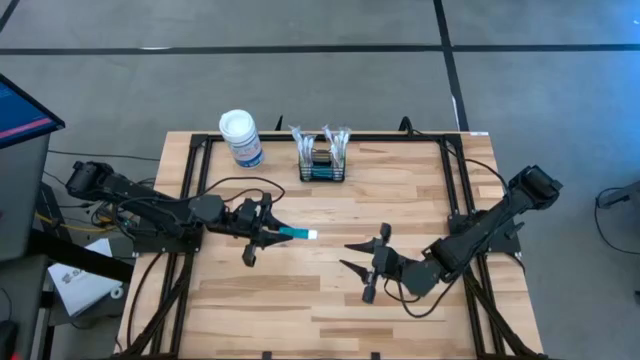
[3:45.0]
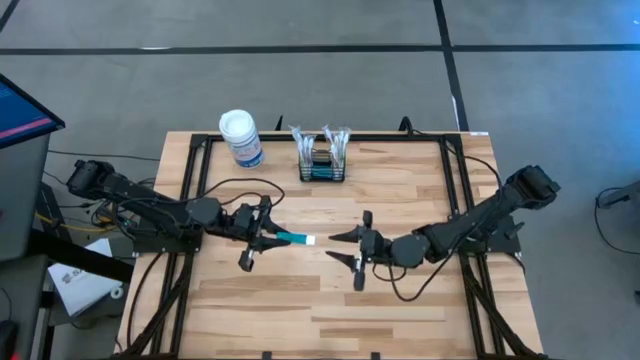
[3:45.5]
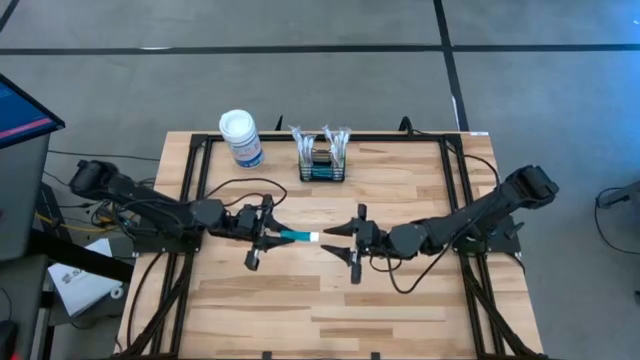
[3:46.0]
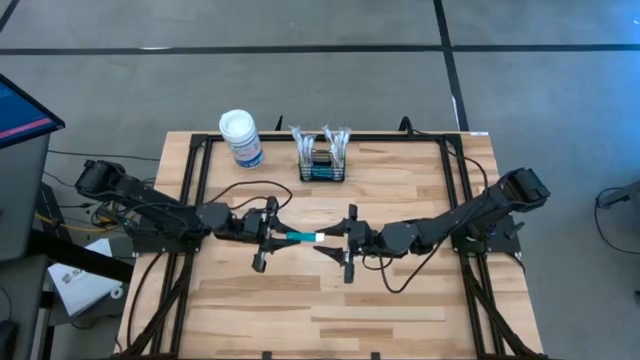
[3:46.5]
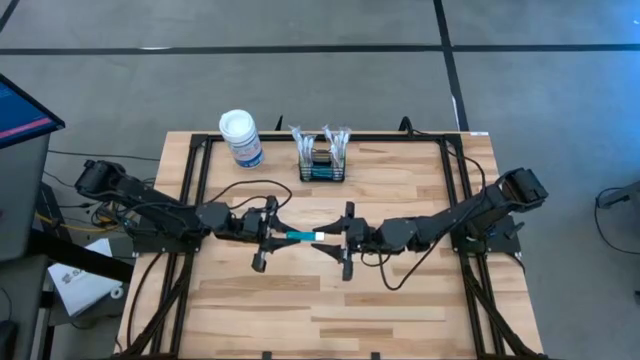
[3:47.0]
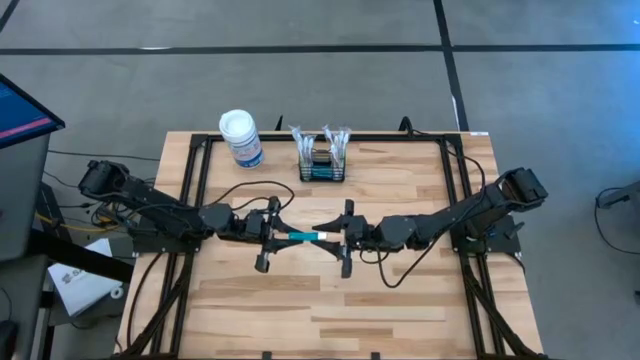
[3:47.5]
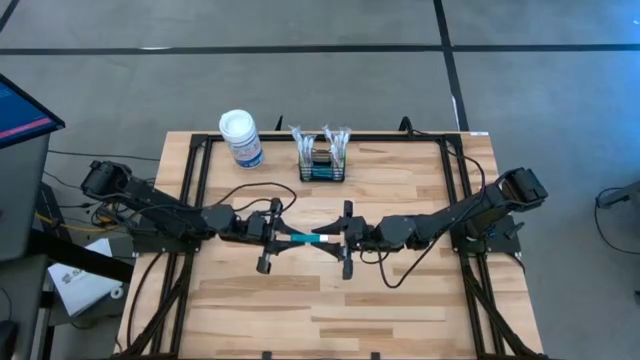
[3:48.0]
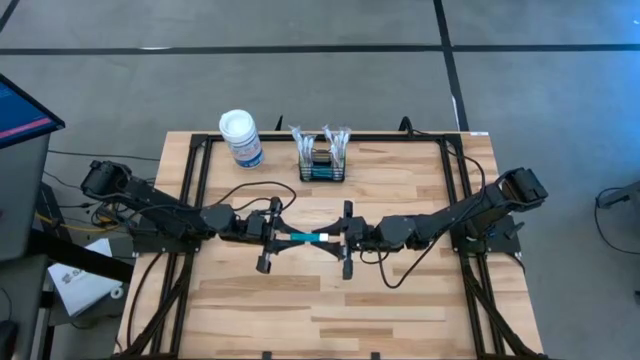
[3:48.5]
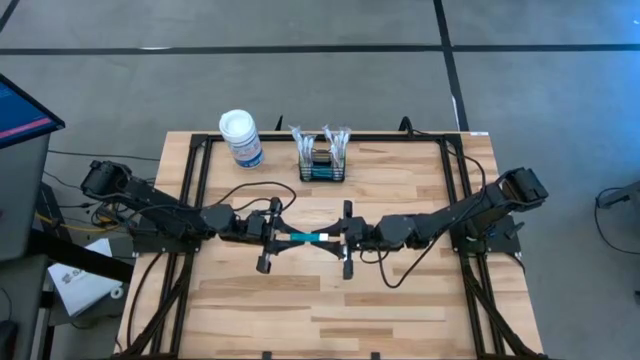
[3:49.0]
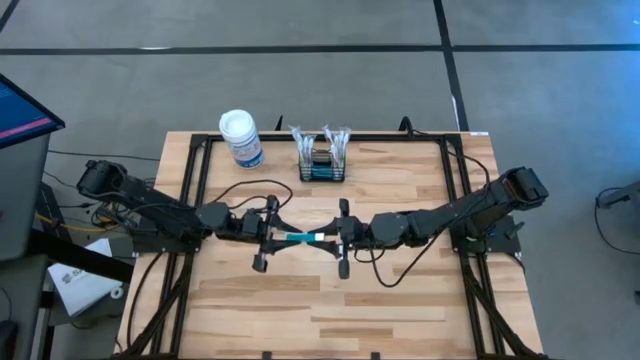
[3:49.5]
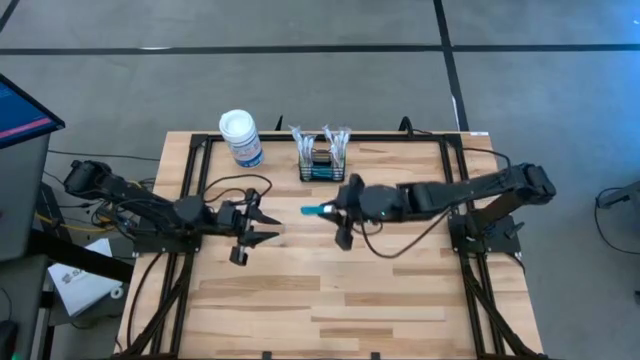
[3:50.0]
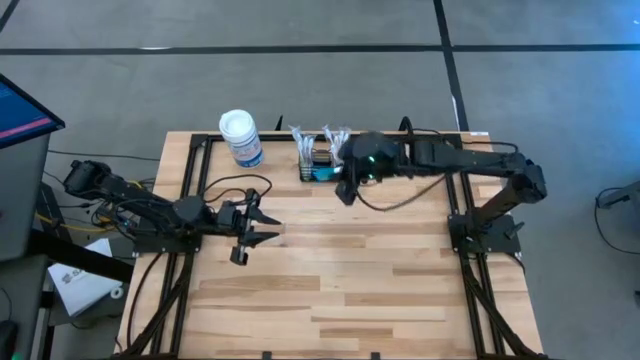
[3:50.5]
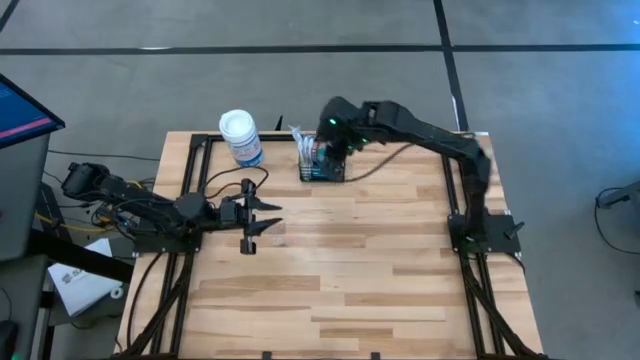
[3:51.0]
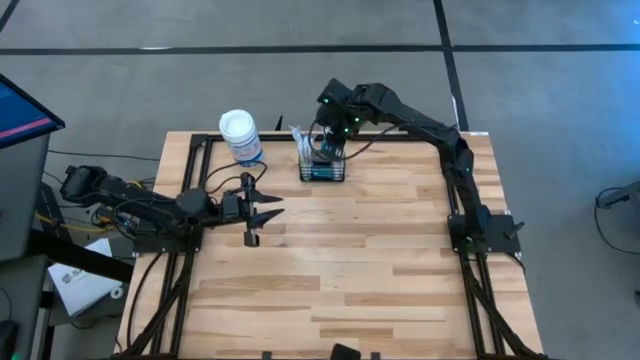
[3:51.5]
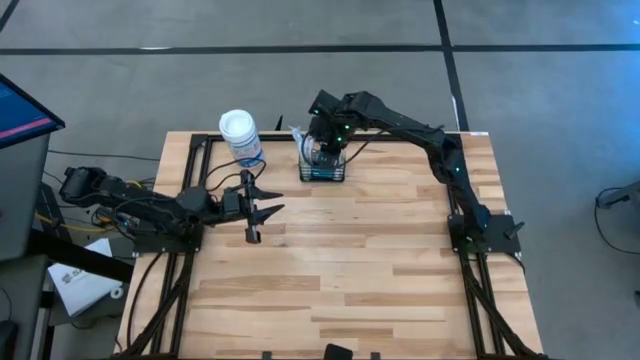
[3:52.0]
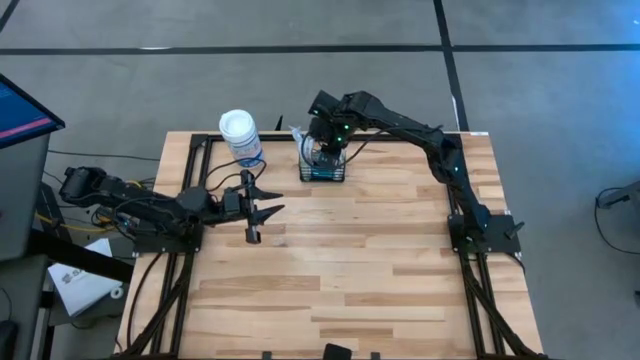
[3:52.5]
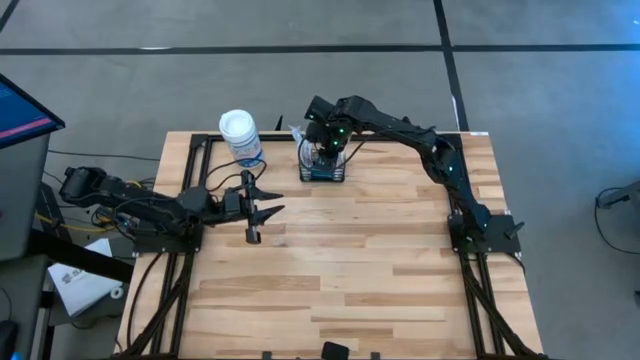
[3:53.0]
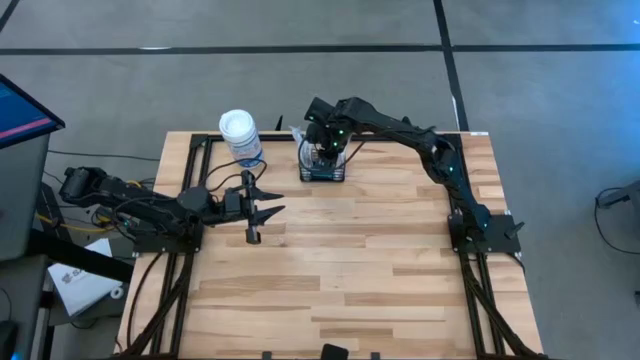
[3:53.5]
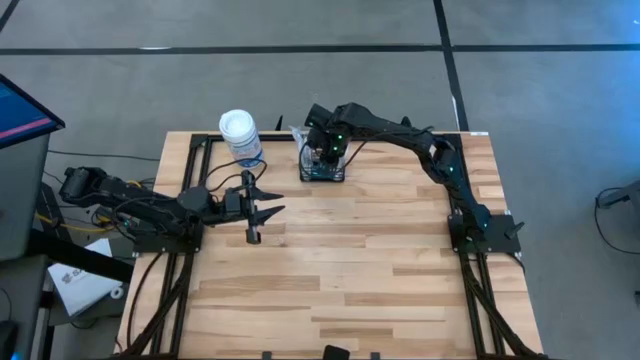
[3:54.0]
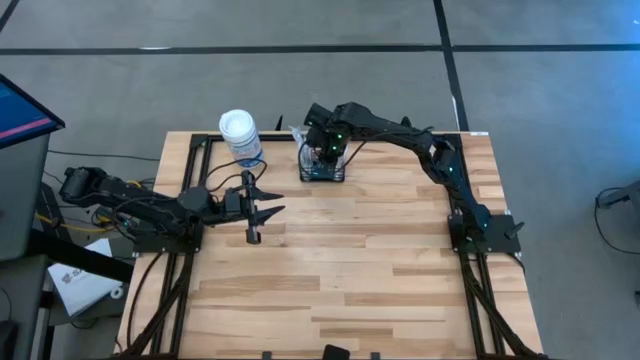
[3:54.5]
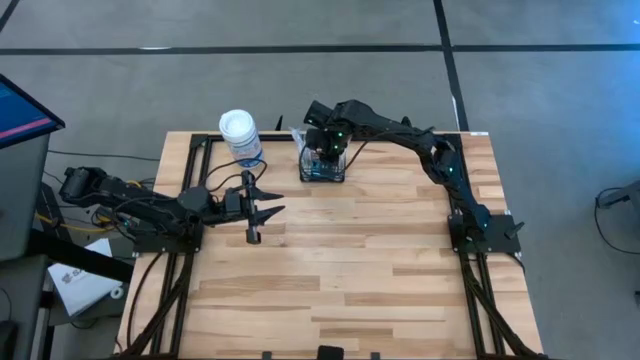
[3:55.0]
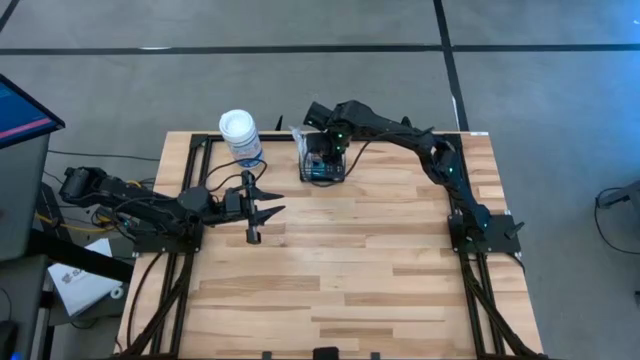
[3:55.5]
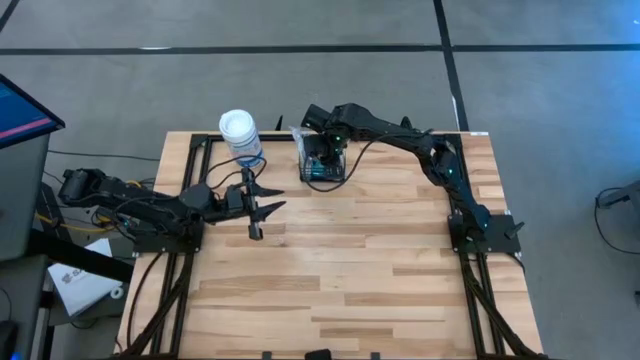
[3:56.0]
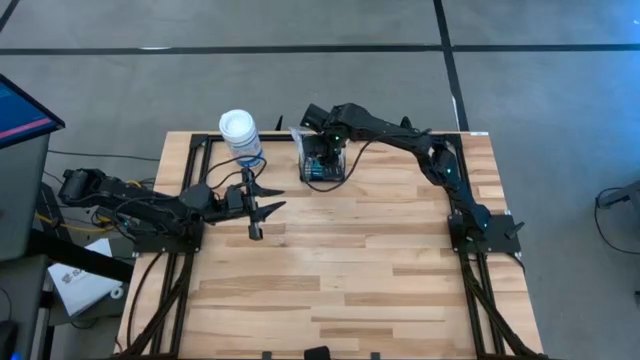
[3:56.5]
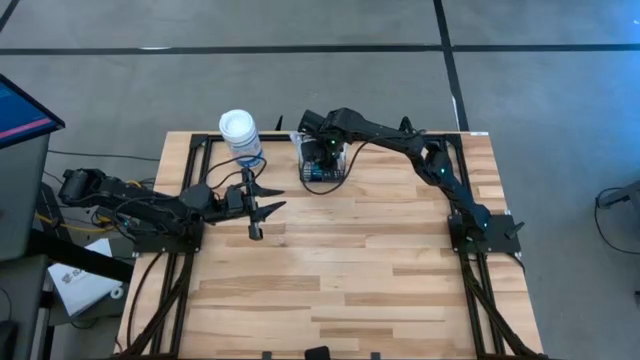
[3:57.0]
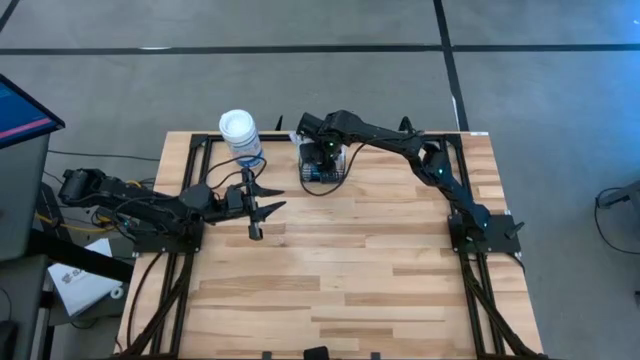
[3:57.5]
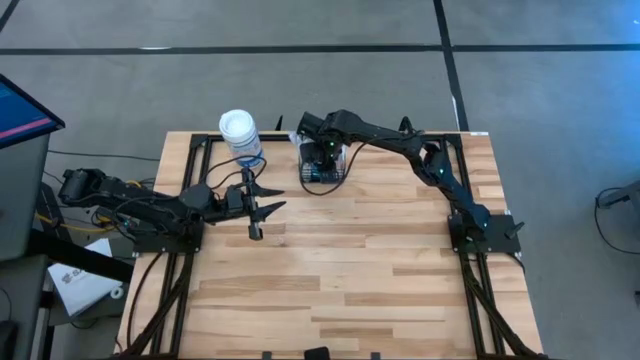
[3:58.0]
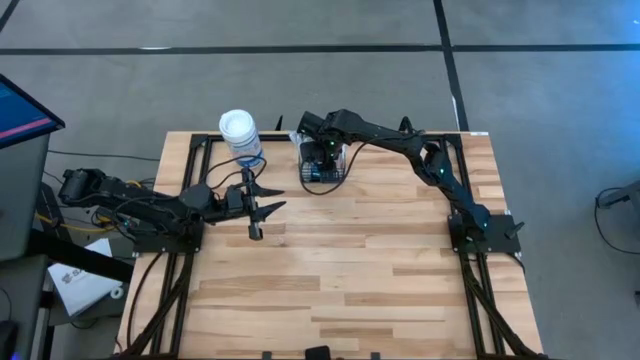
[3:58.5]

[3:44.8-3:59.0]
Task: Pick & Place toothbrushing station
Put the blue mouthwash into the black wire organizer

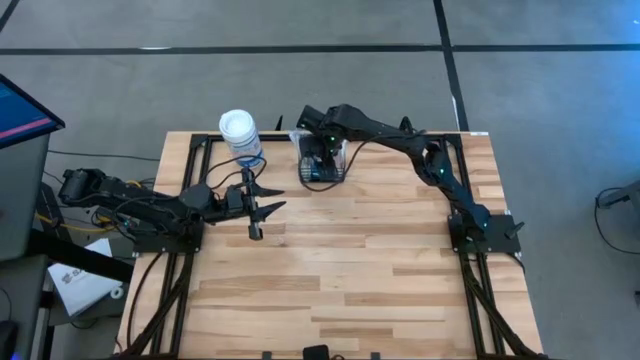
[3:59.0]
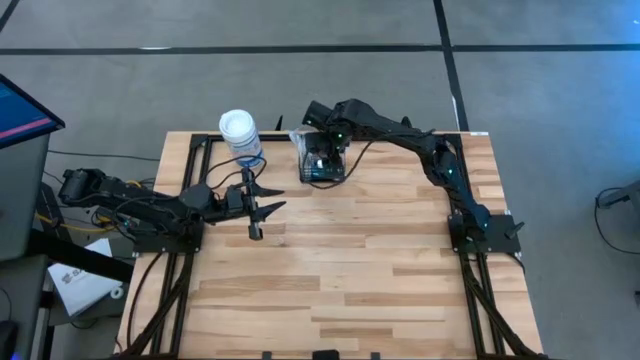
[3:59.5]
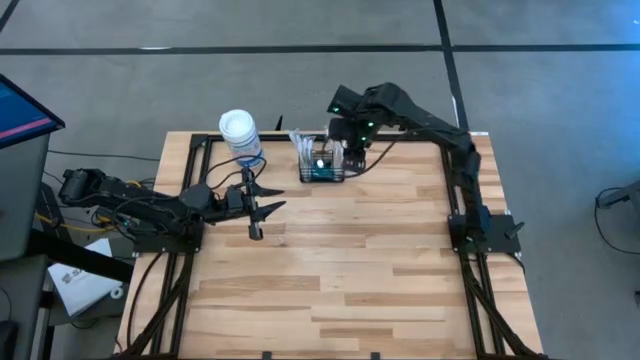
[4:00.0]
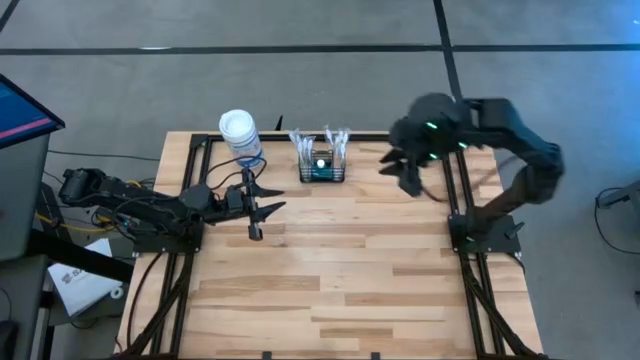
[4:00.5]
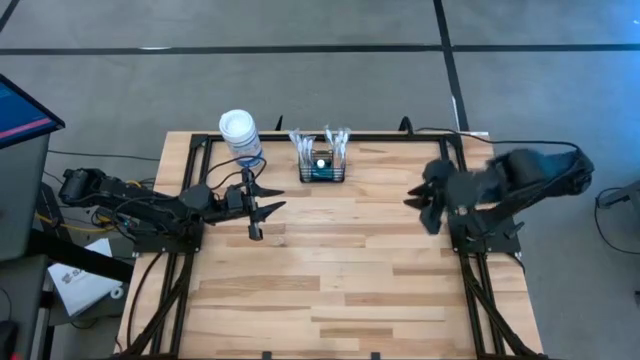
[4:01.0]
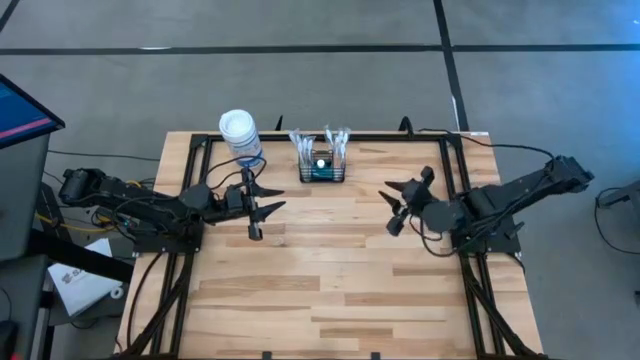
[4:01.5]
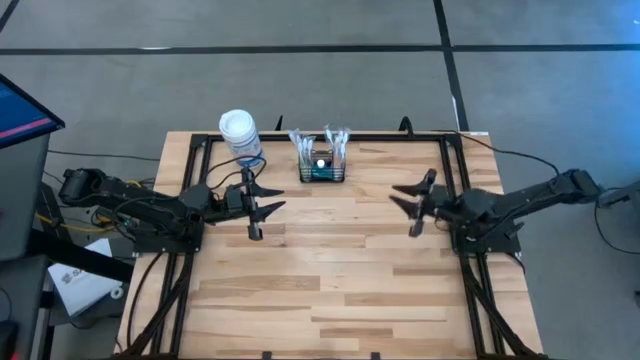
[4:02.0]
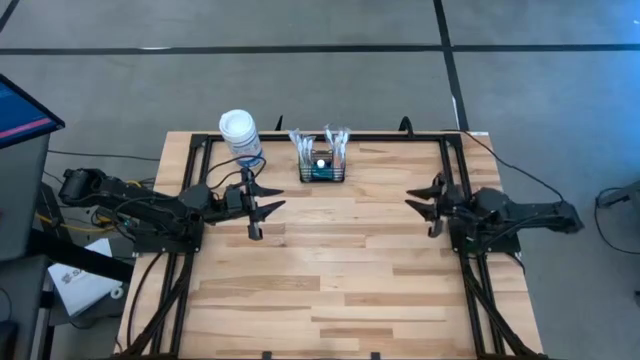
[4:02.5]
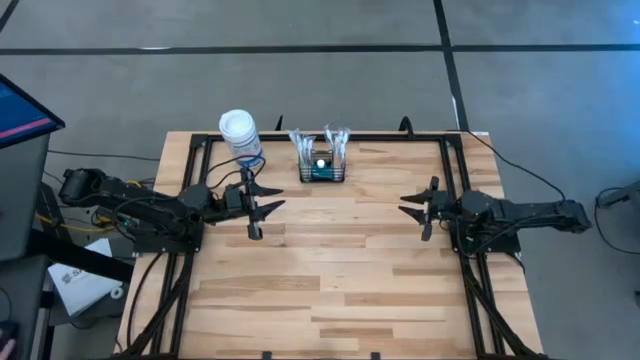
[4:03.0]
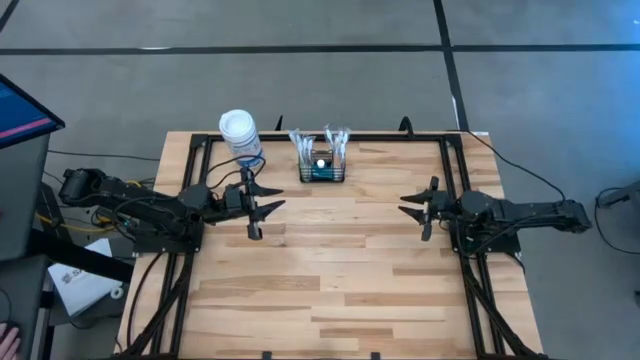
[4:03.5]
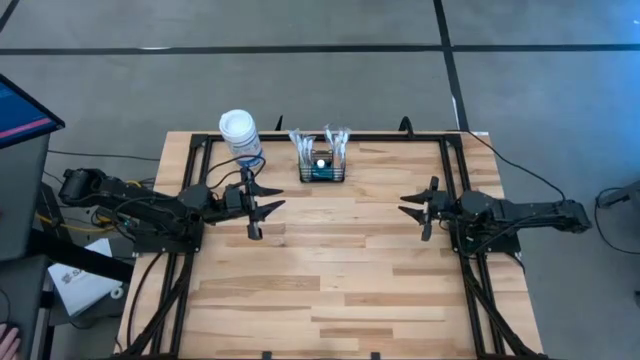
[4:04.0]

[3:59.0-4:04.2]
Return to Home Position

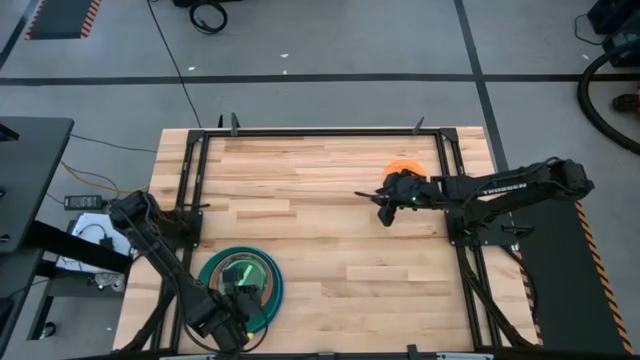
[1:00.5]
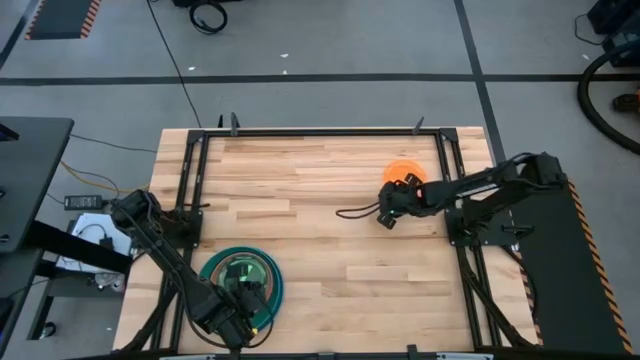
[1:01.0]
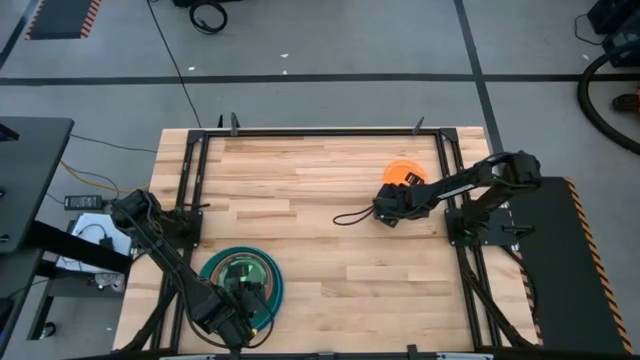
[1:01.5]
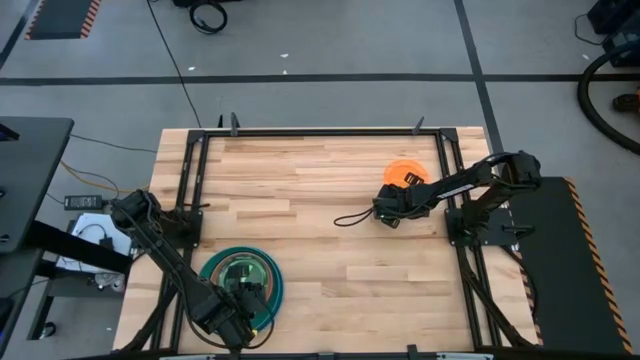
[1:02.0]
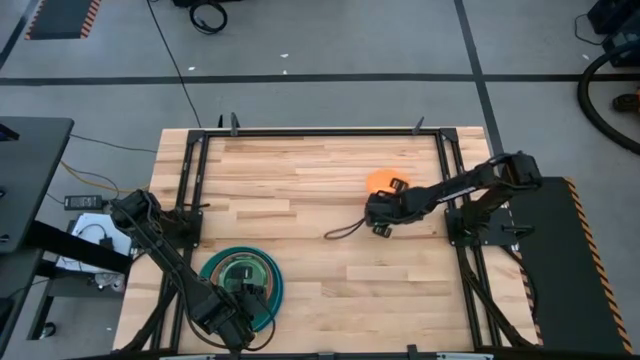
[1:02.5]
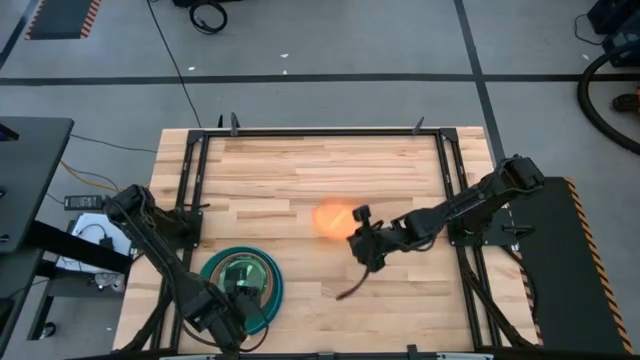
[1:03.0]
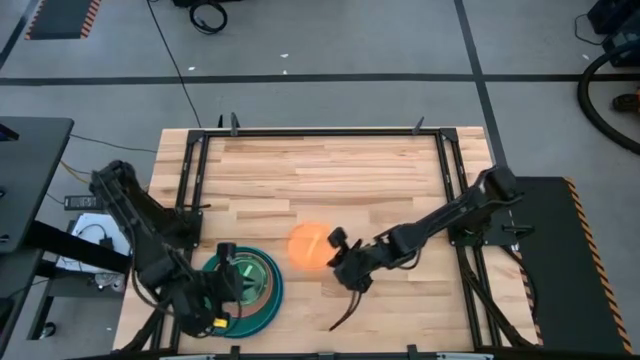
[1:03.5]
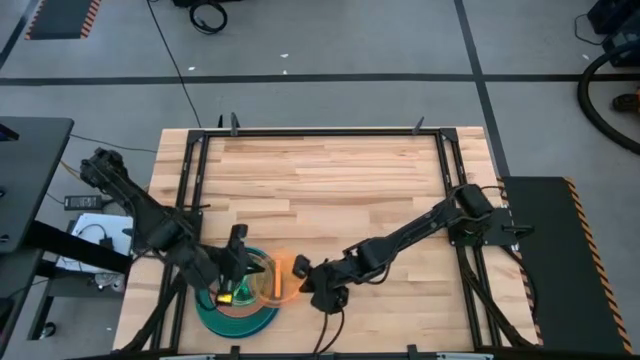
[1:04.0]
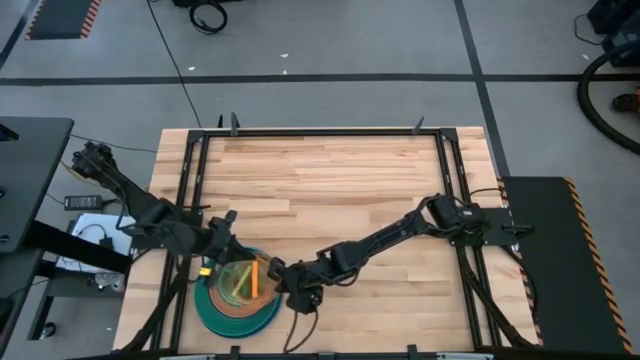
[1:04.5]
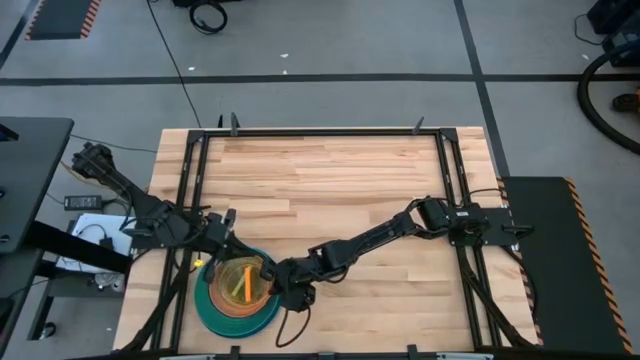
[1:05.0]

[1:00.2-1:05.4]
Task: Stack plastic plates
Stack the orange plate on top of the light green plate
